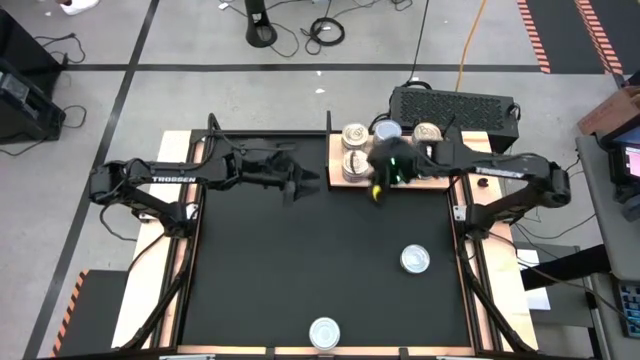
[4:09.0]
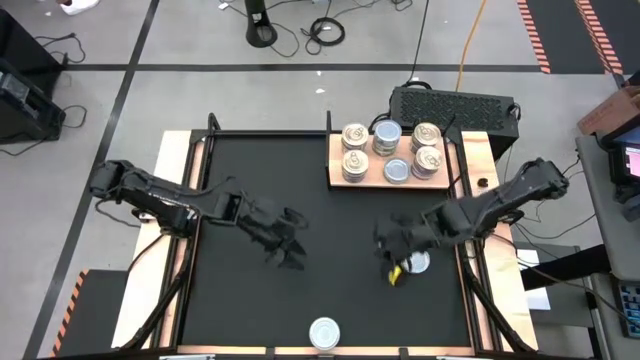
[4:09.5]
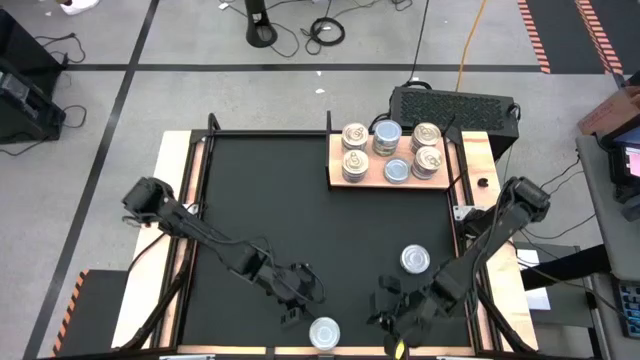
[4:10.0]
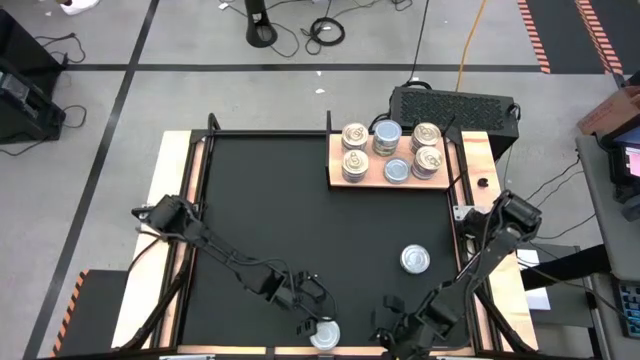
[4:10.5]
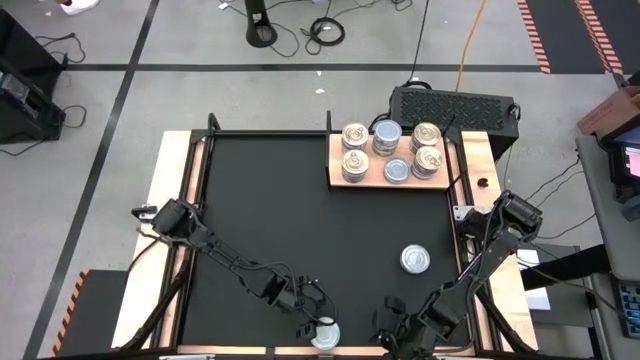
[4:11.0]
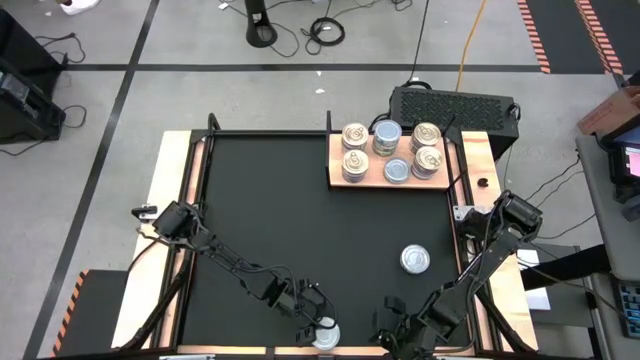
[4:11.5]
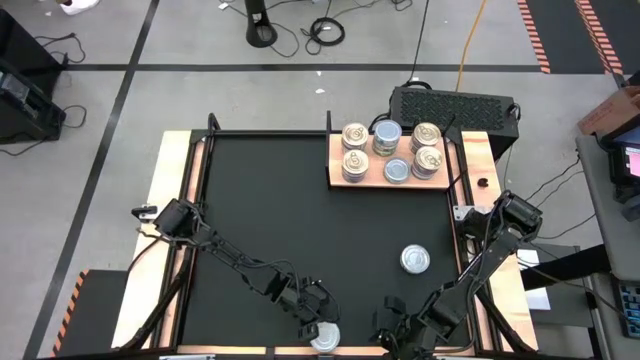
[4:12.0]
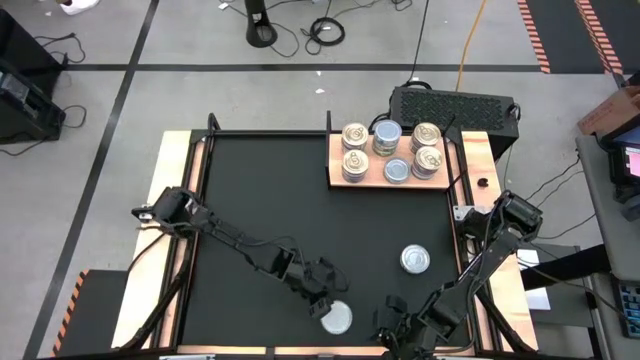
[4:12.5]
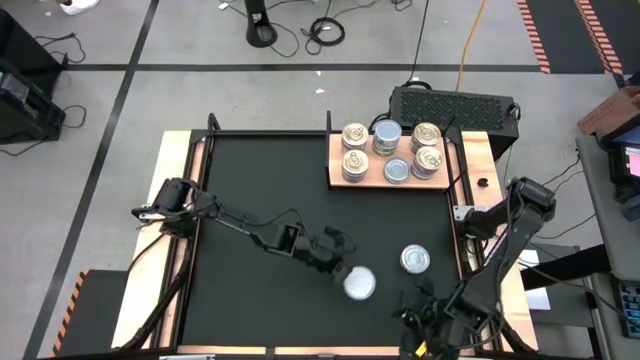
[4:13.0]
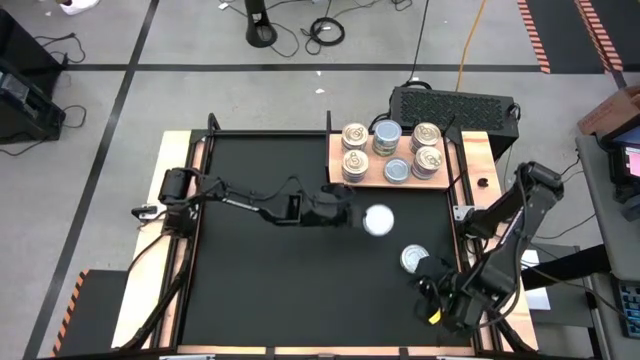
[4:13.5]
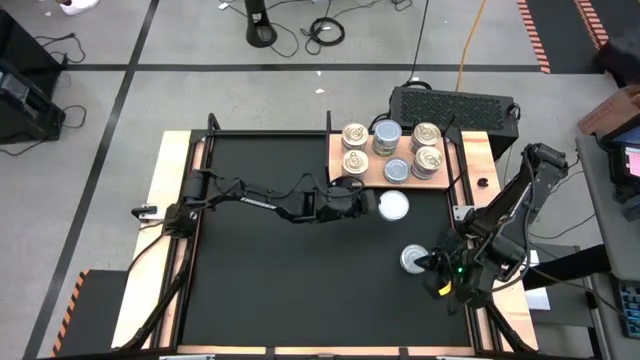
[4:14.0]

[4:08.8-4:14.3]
Task: Stack canned seafood by type on shelf
Stack the green tuna can on top of the other green tuna can on the shelf

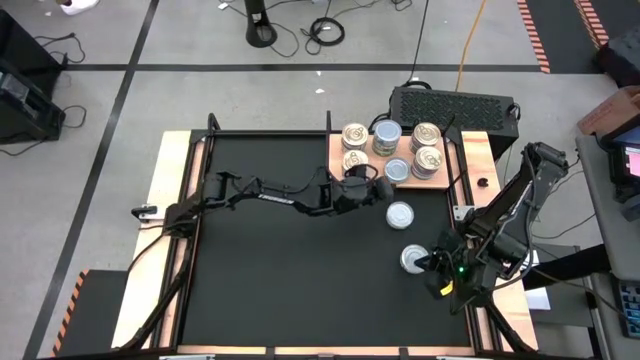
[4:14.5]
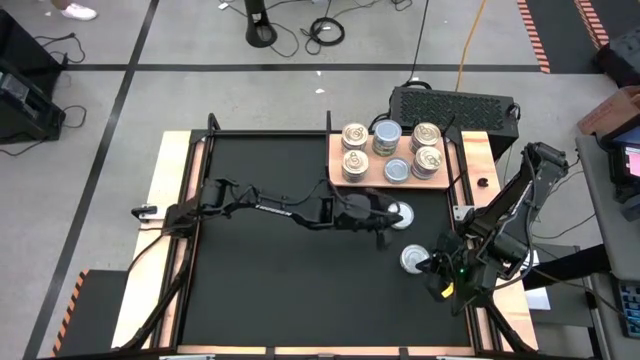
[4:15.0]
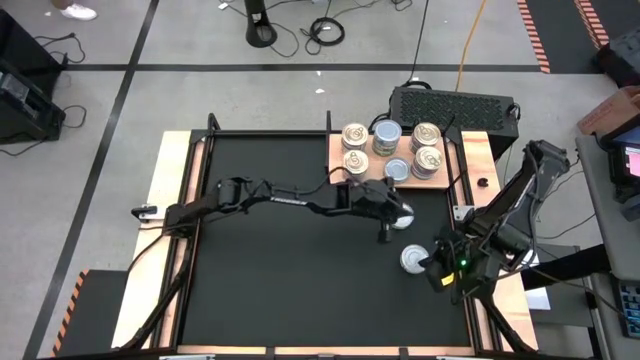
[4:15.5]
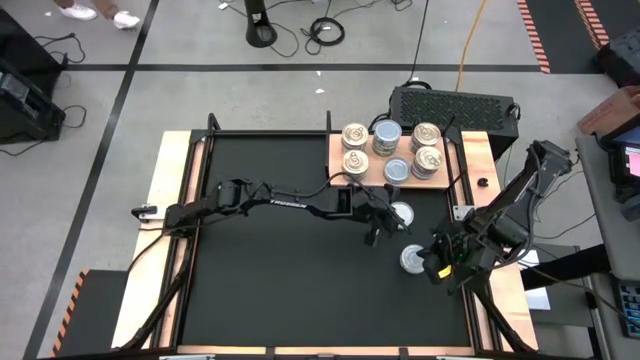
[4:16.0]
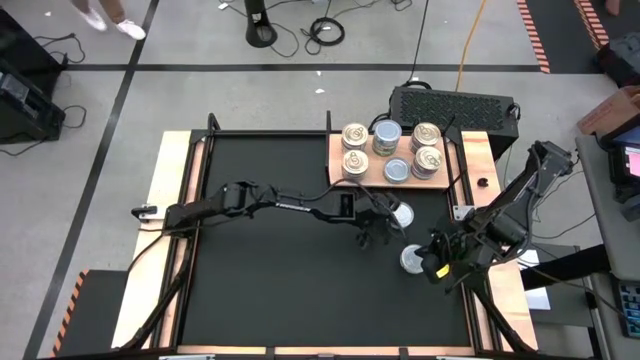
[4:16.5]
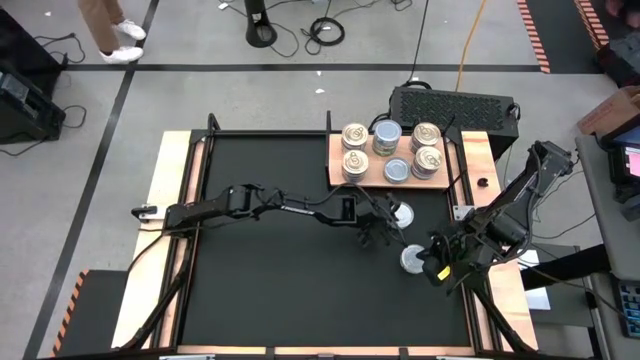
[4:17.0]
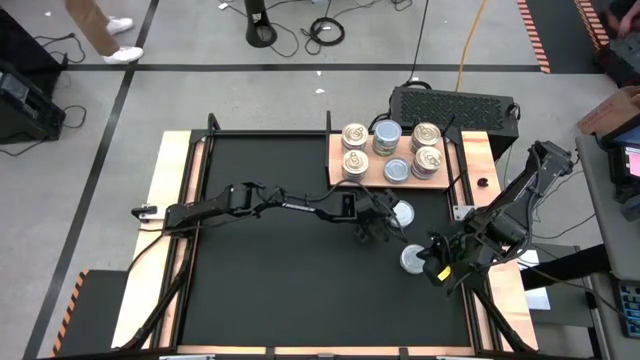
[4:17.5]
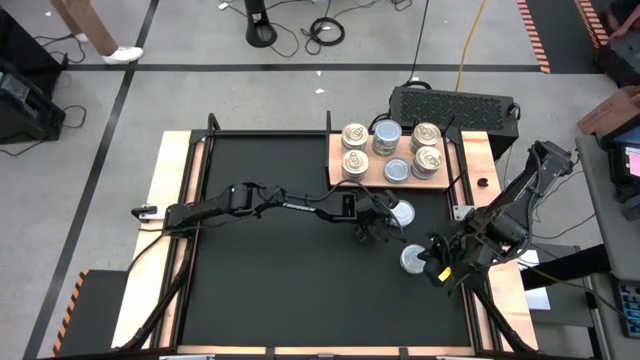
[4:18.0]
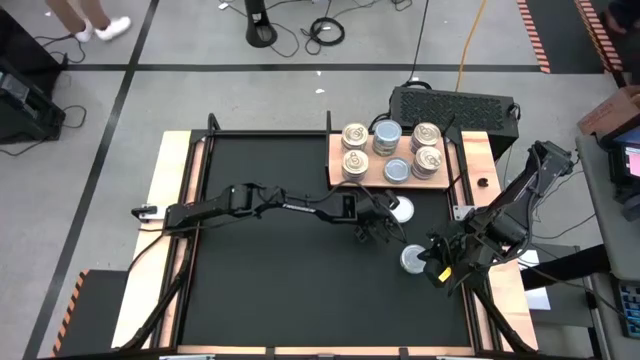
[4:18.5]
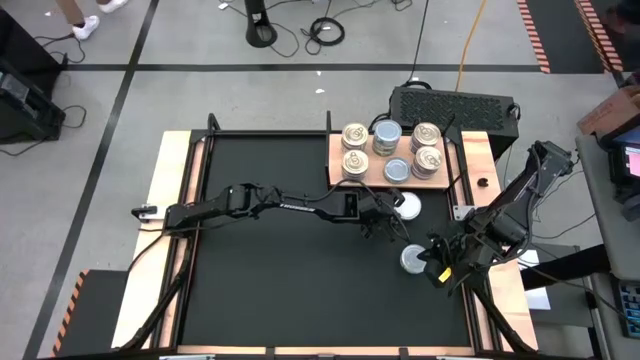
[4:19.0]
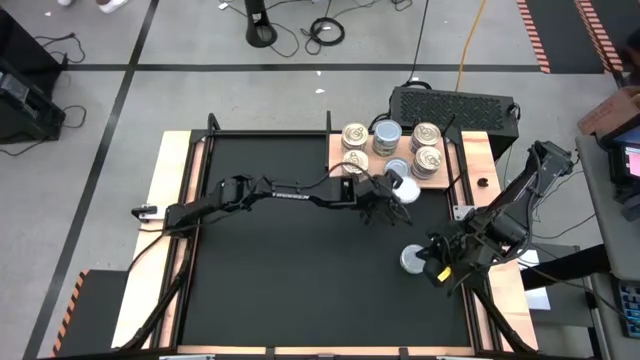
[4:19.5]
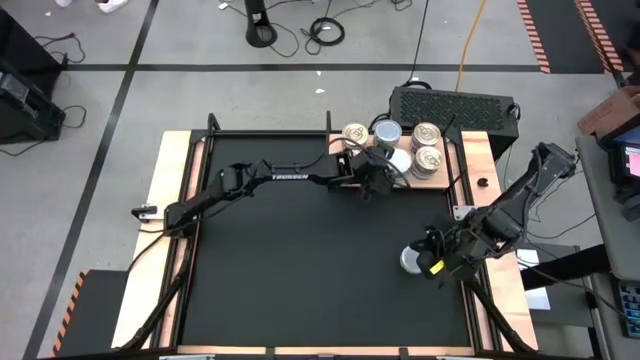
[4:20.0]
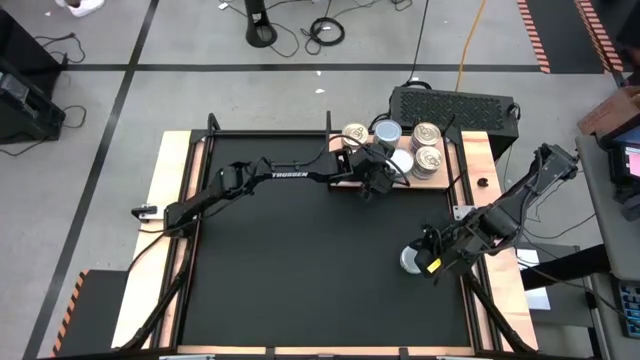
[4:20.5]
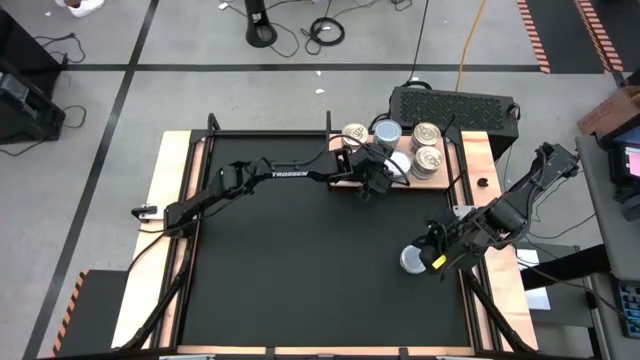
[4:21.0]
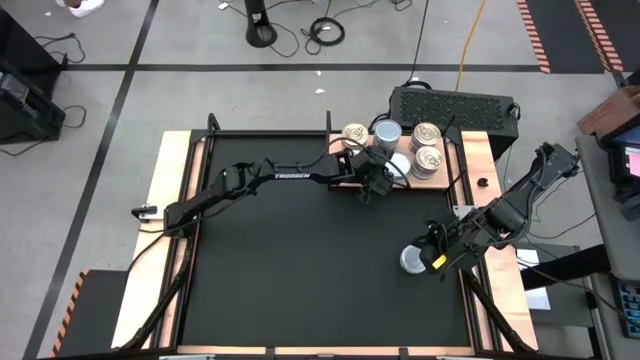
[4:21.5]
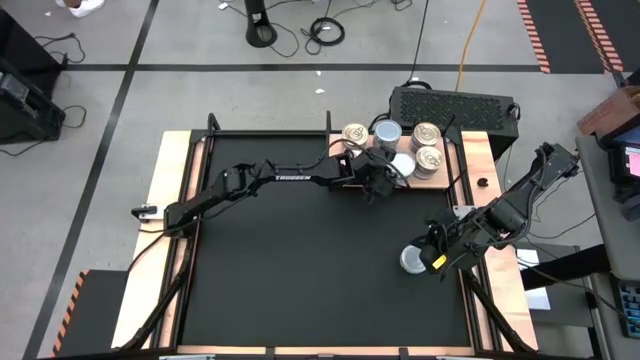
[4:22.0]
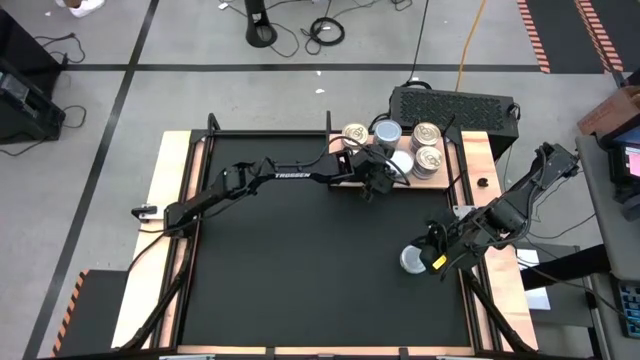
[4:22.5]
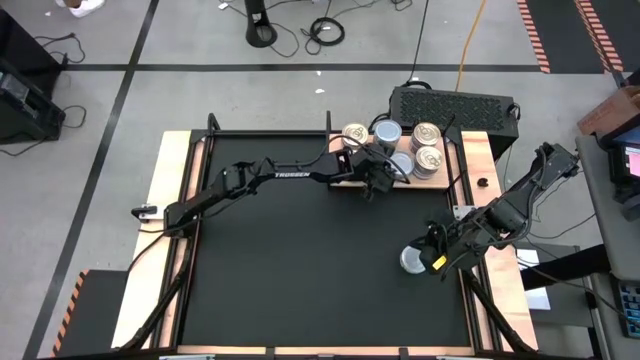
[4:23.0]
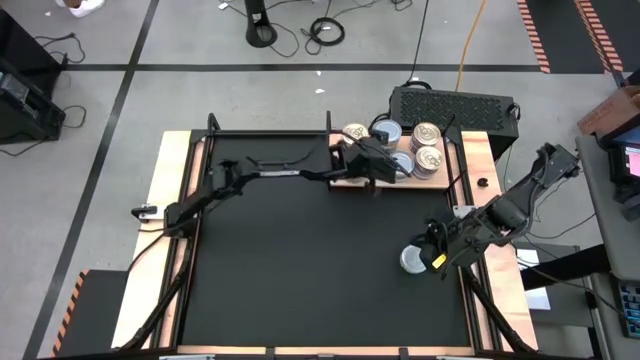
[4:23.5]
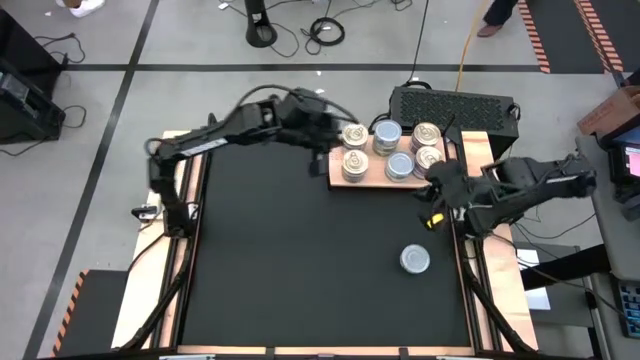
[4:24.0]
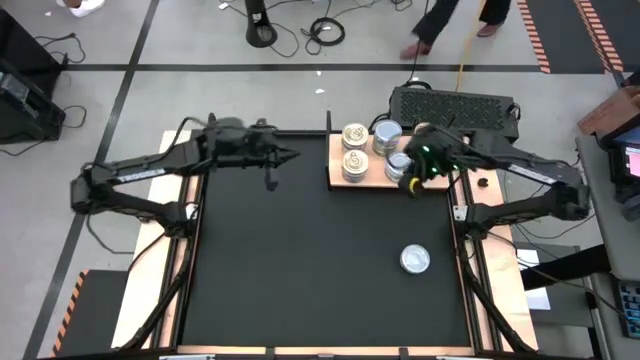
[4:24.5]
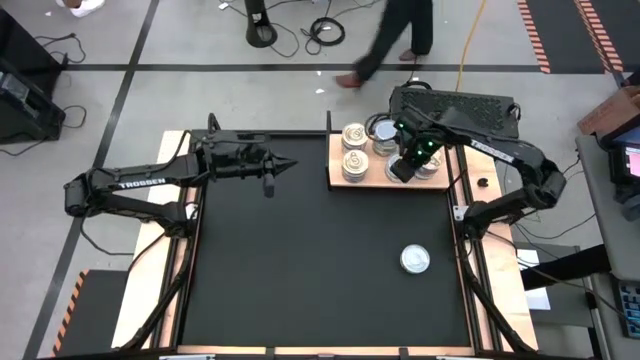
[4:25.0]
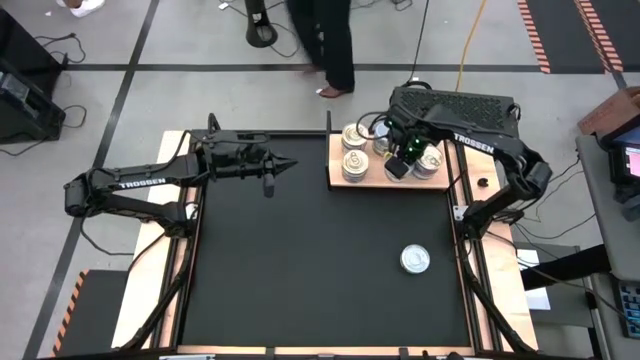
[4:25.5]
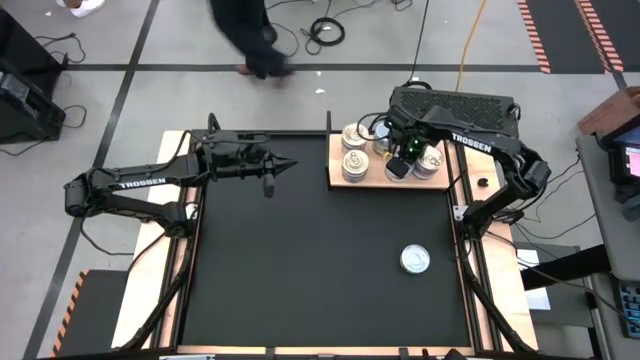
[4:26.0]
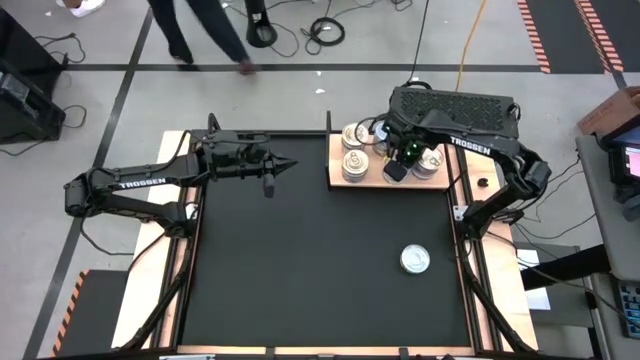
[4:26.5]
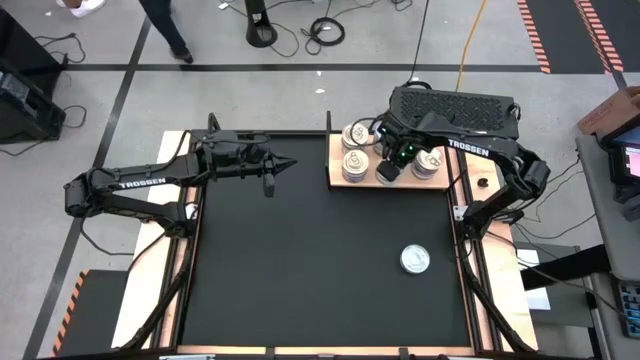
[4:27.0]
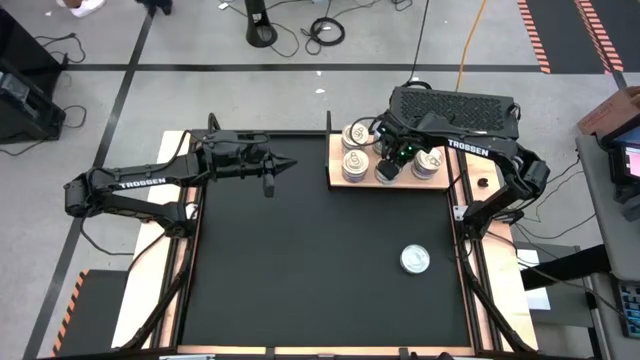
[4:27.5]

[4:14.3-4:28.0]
Stack the green tuna can on top of the other green tuna can on the shelf

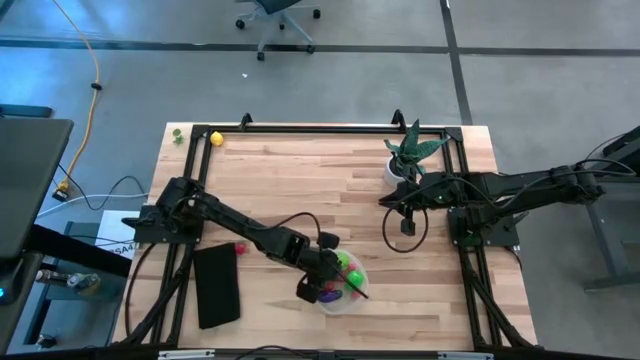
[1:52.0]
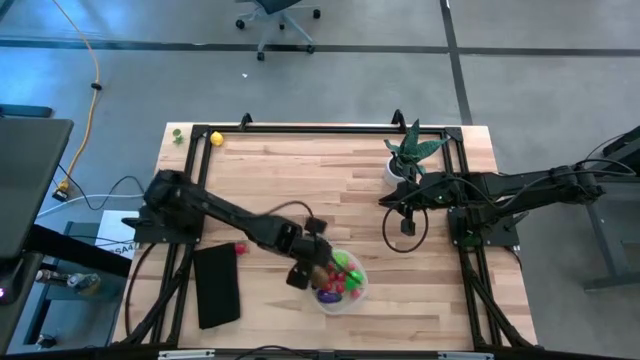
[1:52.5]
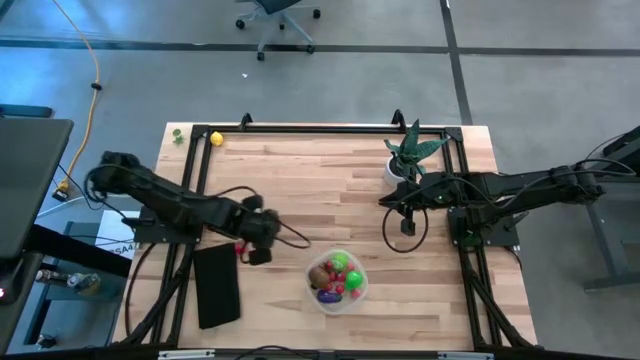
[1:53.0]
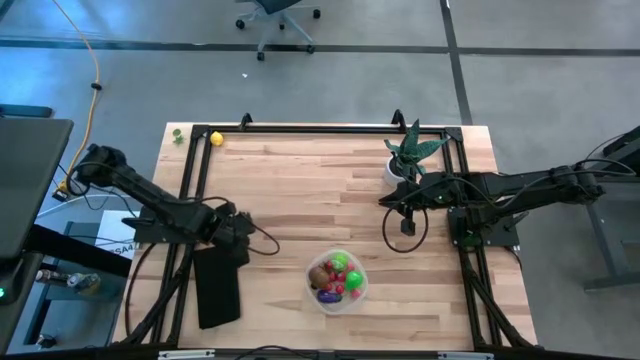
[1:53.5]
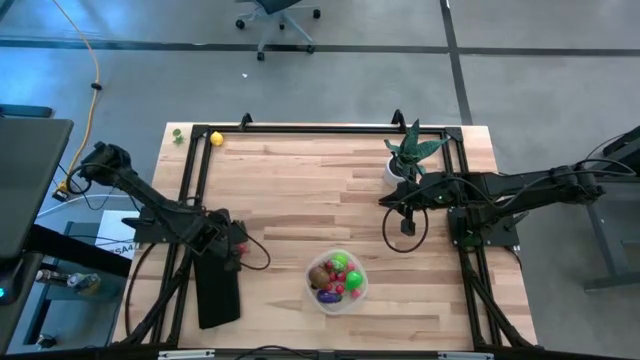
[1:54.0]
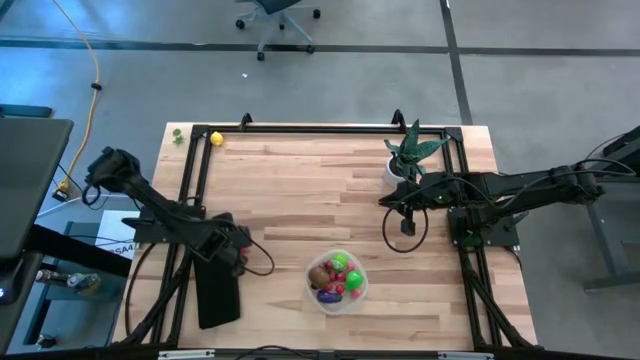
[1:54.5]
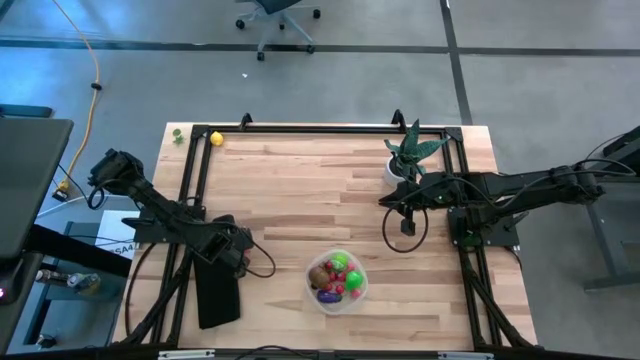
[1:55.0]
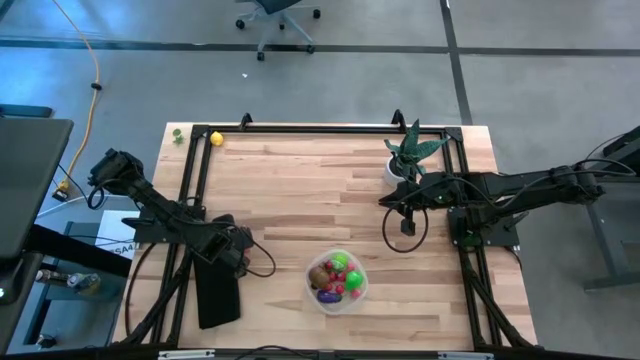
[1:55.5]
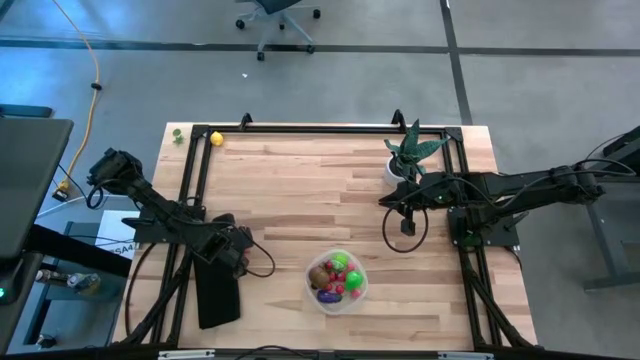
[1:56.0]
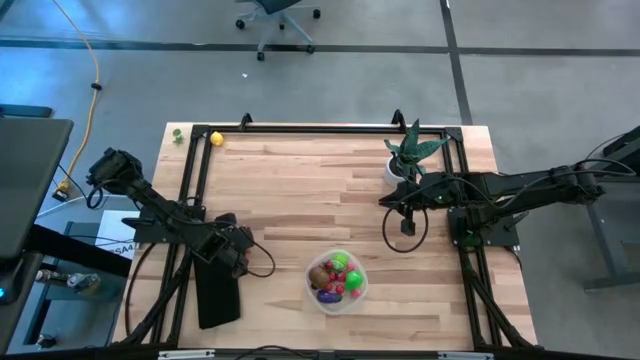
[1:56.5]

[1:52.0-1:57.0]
Task: Pick and placing Produce into tupperware
Put the red strawberry into the transparent container
